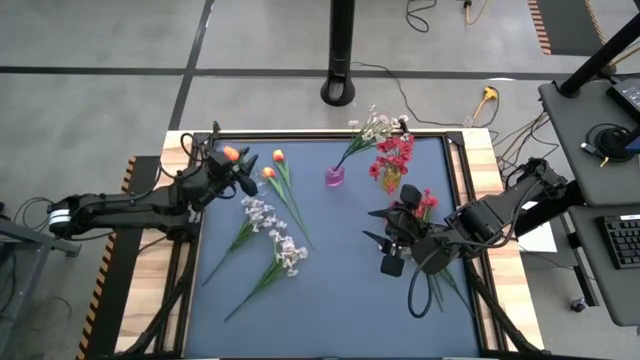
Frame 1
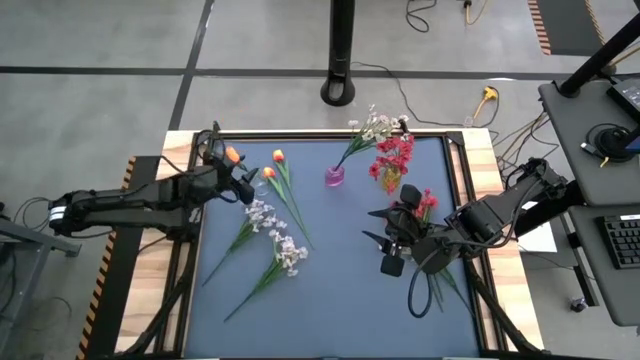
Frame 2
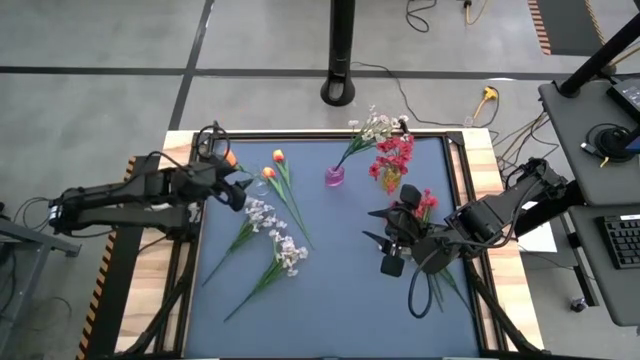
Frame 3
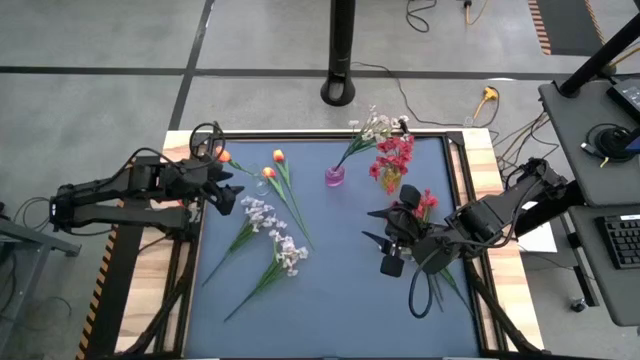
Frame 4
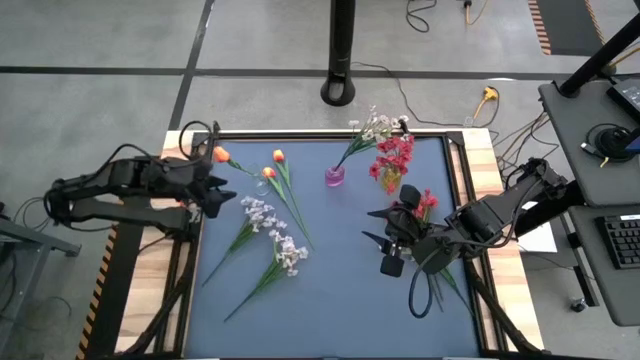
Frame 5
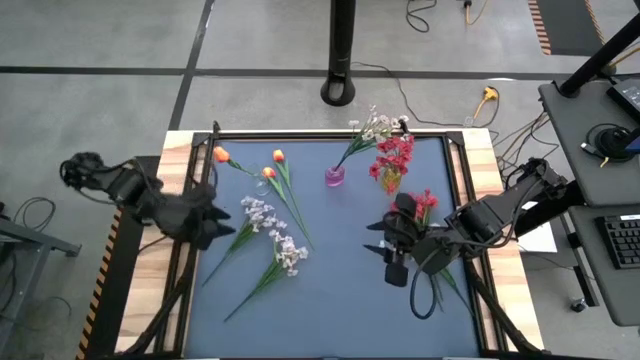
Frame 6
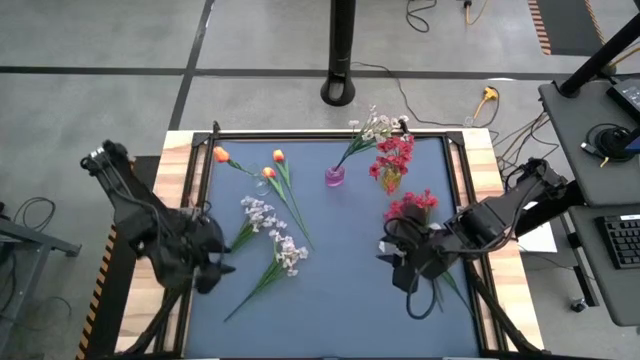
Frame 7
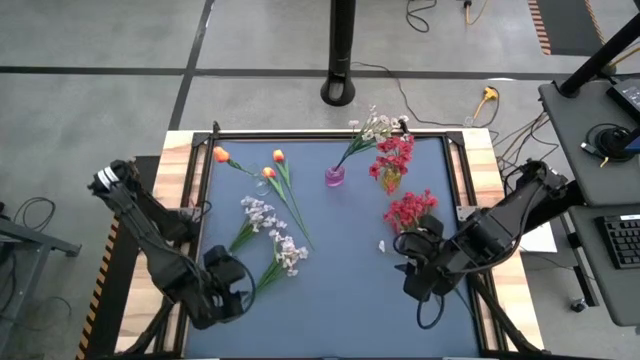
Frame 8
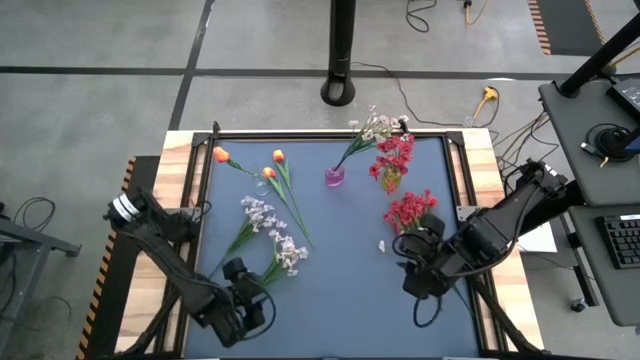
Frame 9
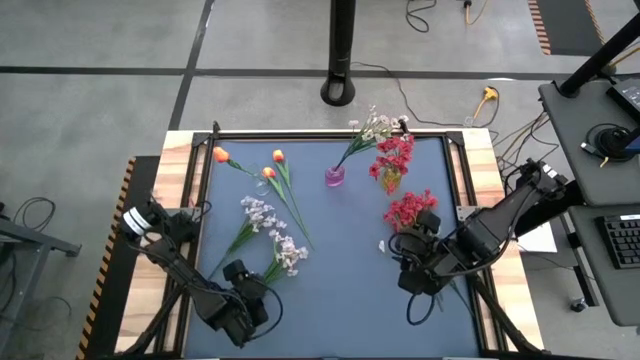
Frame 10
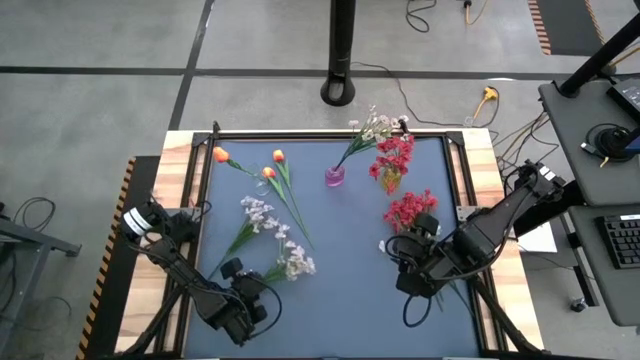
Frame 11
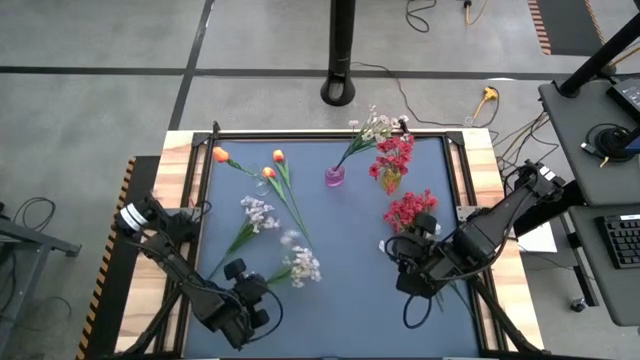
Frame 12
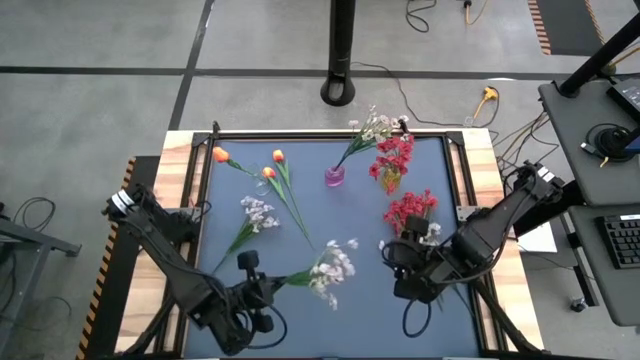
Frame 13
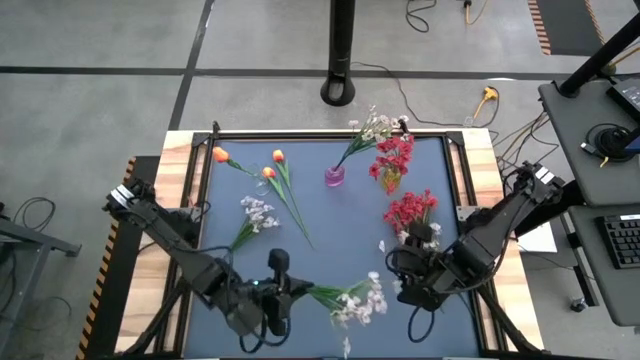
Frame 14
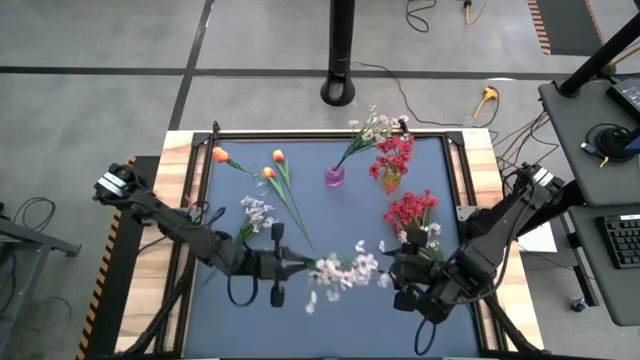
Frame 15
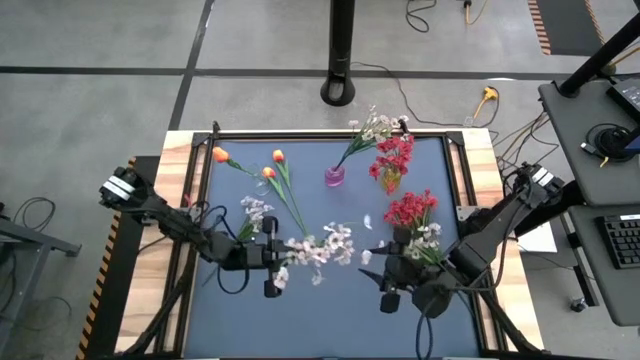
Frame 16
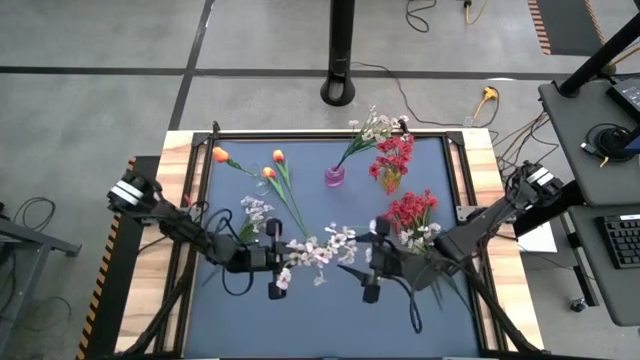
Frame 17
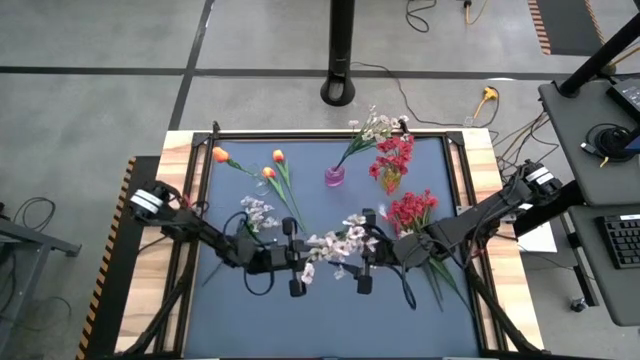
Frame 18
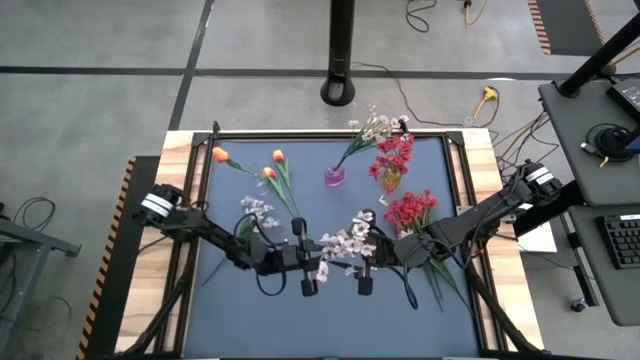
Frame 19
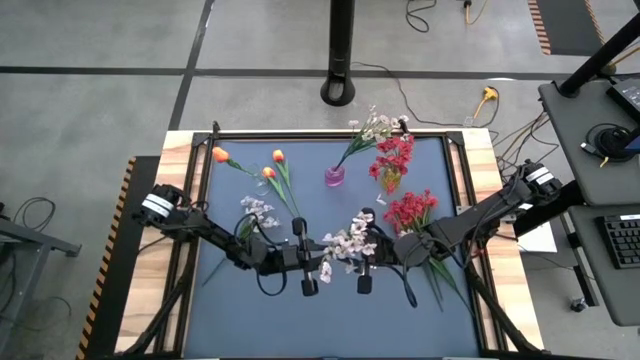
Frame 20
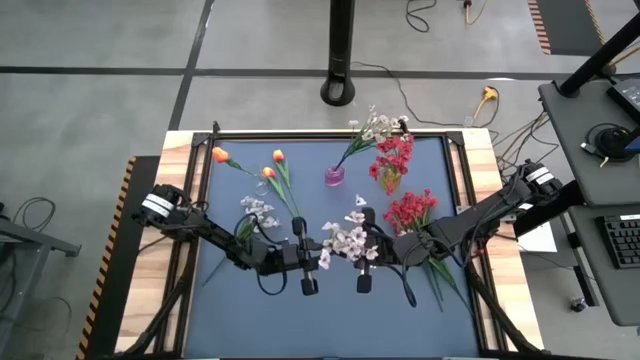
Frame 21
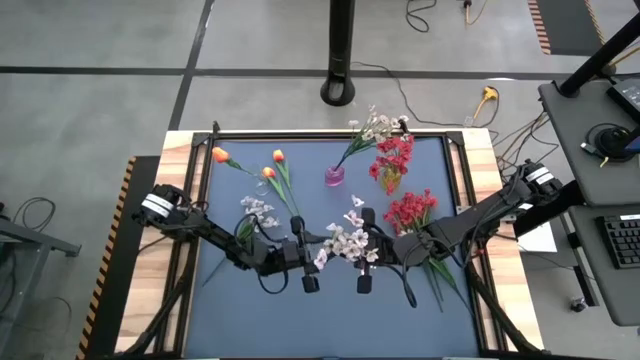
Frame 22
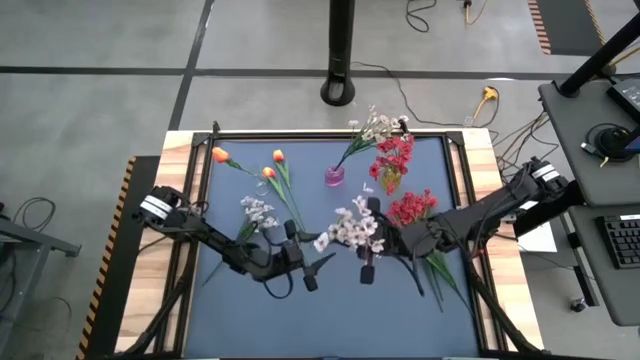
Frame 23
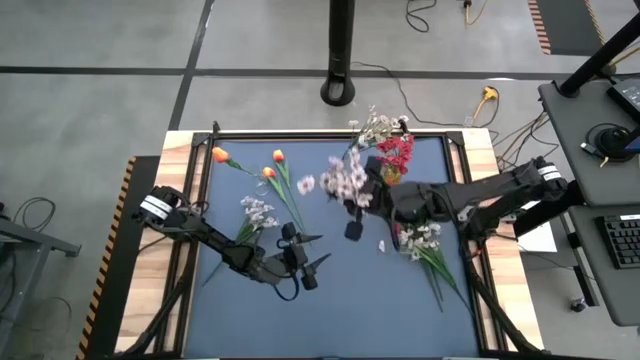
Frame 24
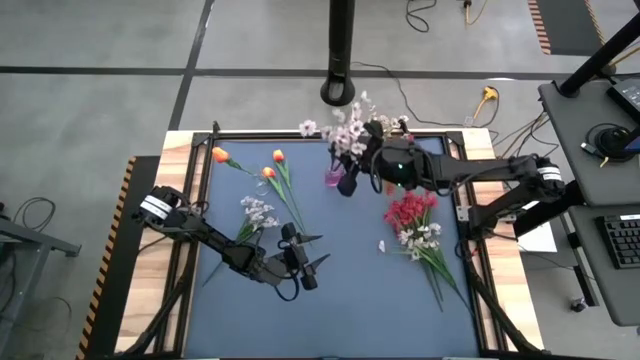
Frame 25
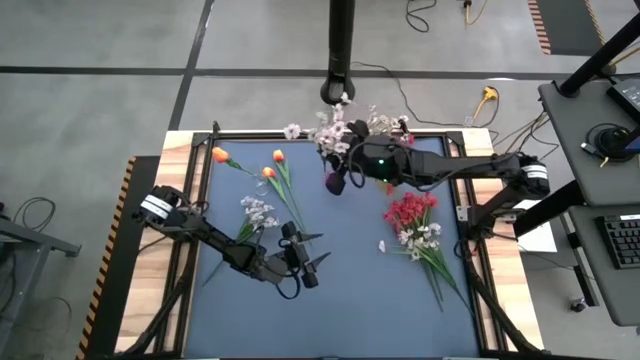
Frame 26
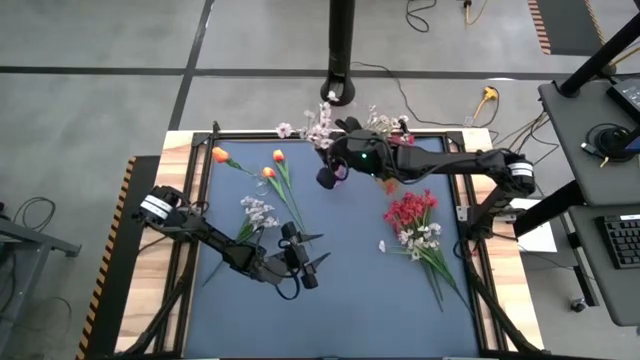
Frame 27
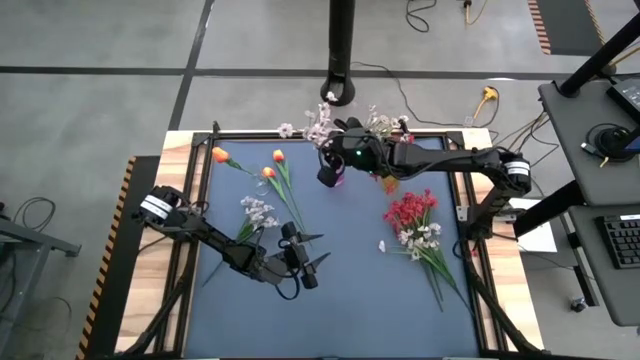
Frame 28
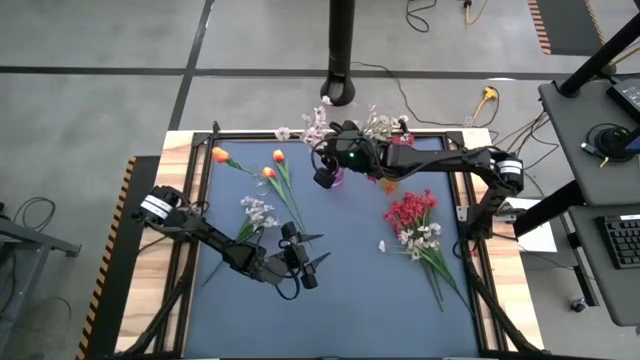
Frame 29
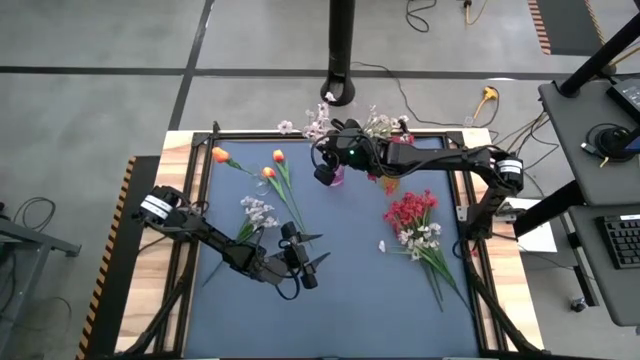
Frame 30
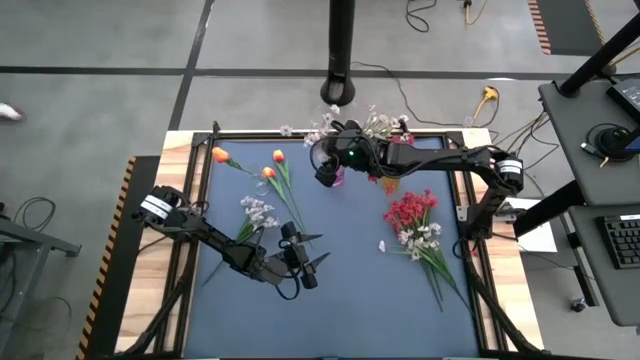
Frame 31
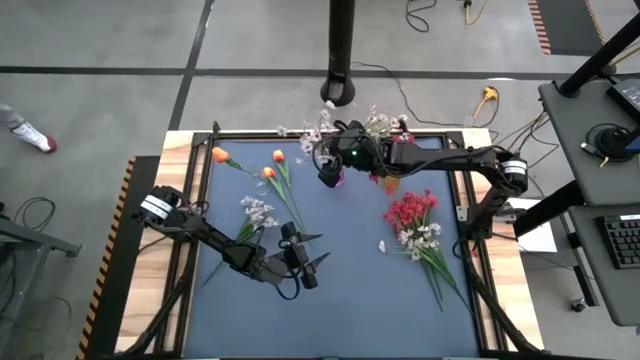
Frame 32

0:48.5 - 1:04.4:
Task: Sort flowers into vase by color
Put the white flowers into the pink vase

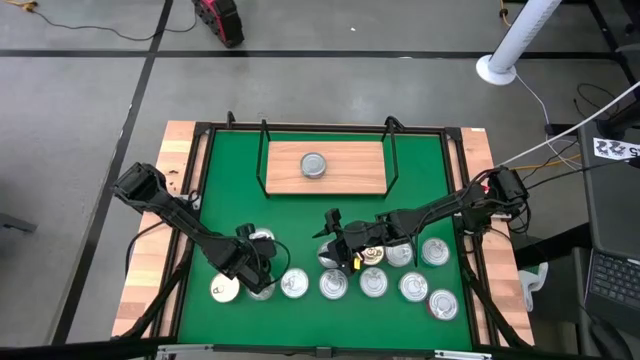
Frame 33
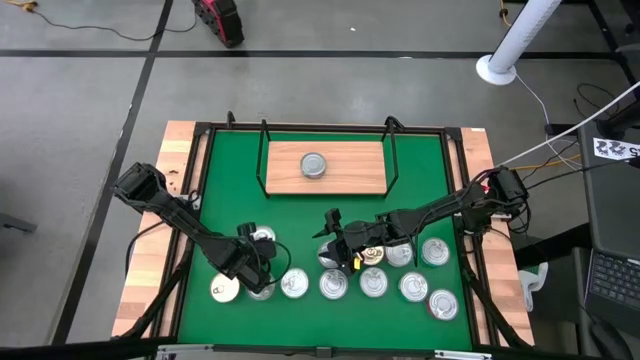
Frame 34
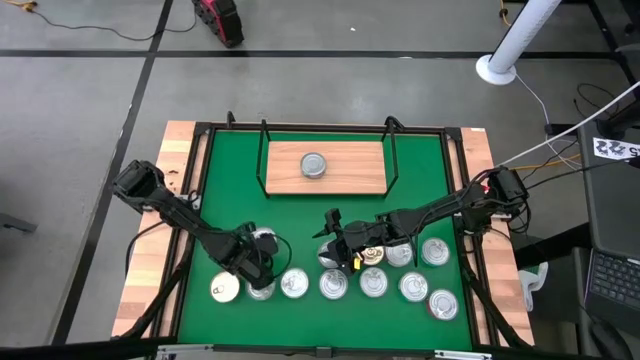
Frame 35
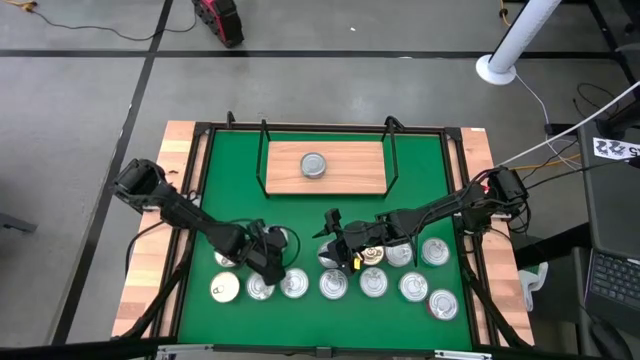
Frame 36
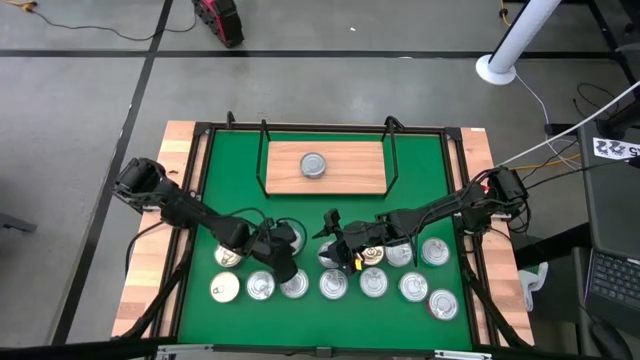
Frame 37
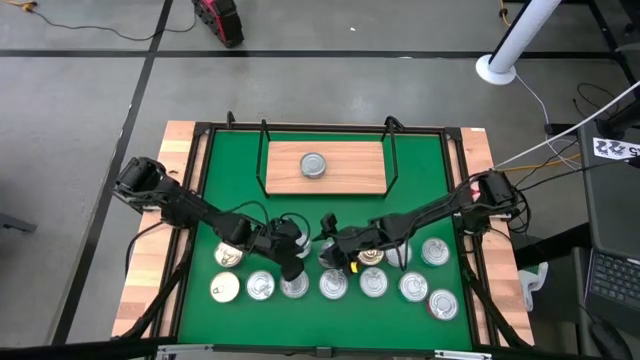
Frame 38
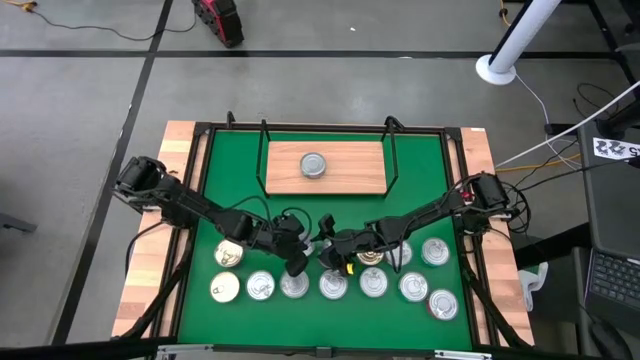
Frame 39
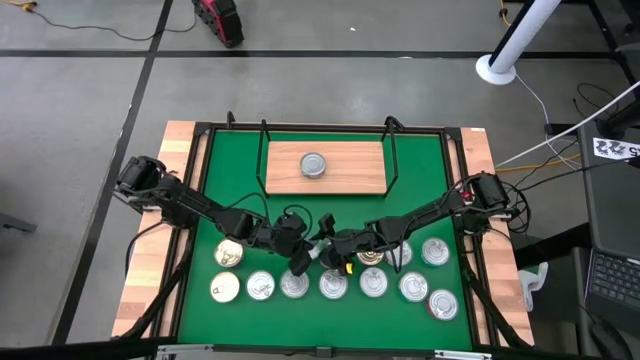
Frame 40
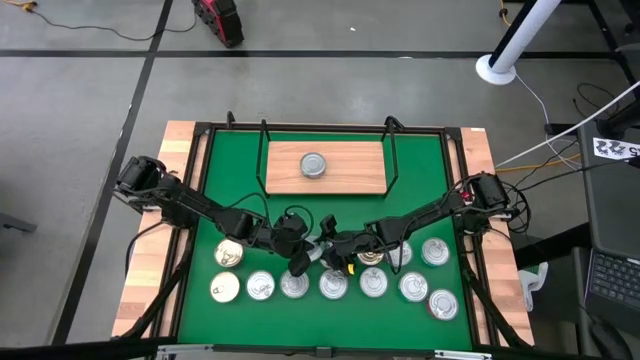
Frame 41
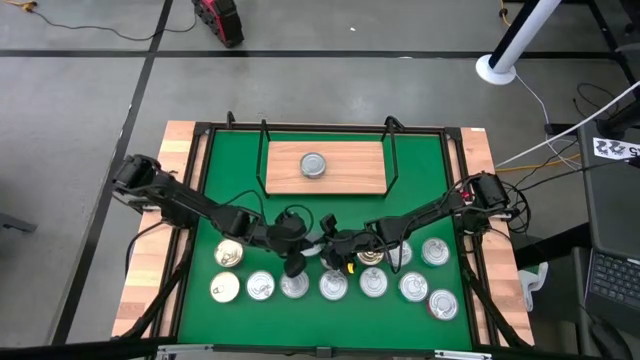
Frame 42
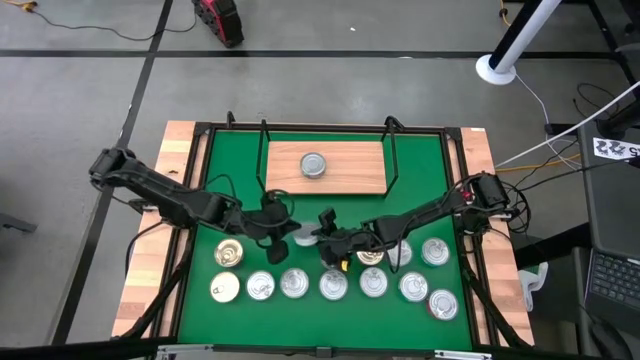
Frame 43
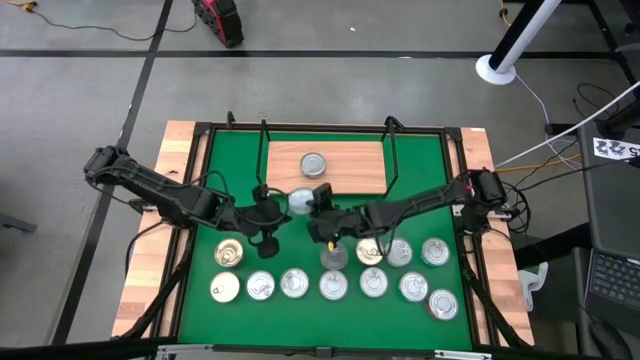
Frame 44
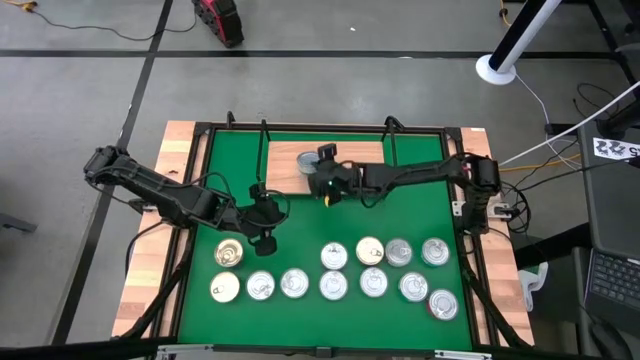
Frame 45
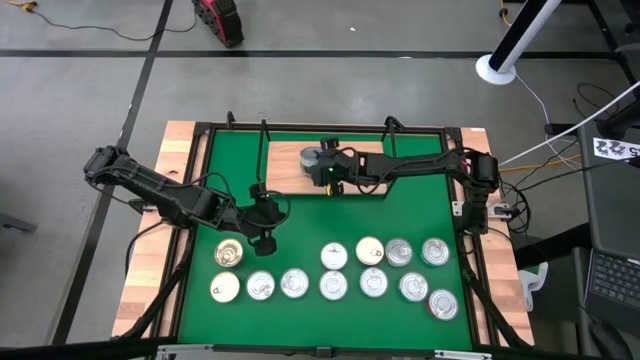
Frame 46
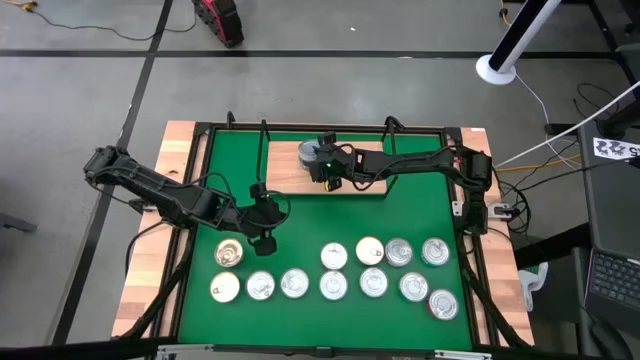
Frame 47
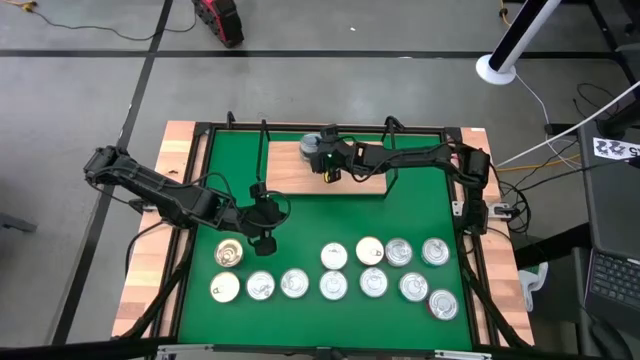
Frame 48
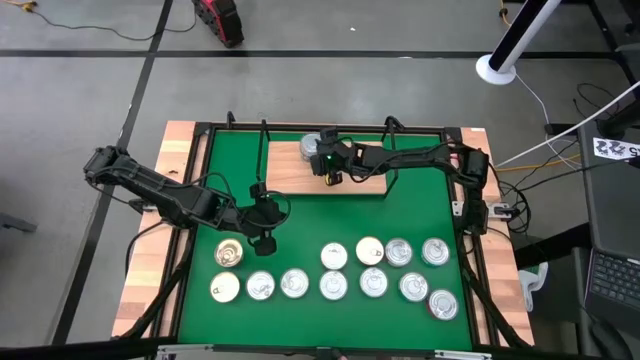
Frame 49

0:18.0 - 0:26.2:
Task: Stack canned seafood by type on shelf
Stack the green white tuna can on top of the other green white tuna can on the shelf
